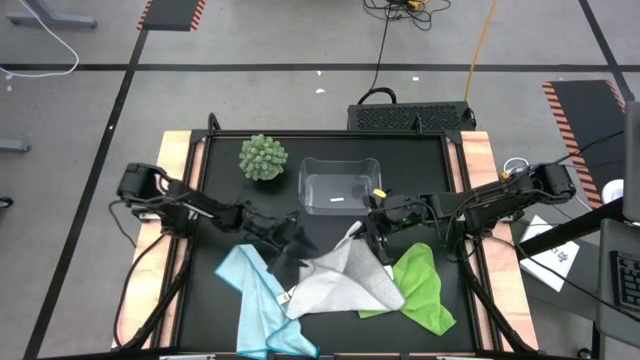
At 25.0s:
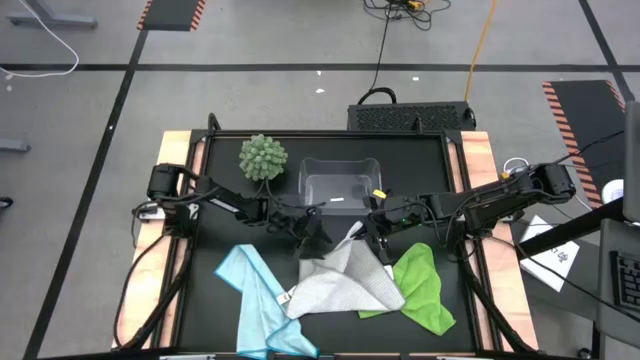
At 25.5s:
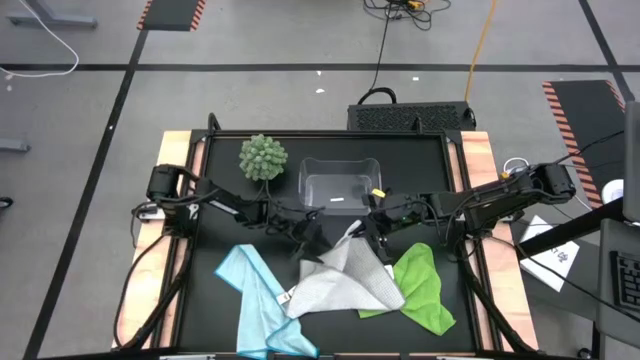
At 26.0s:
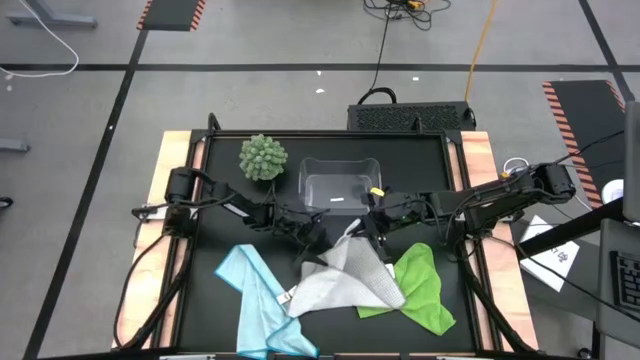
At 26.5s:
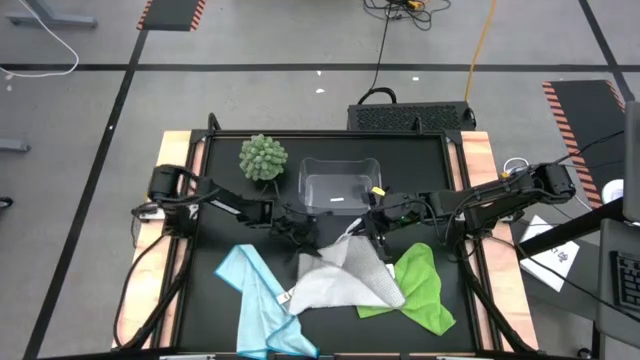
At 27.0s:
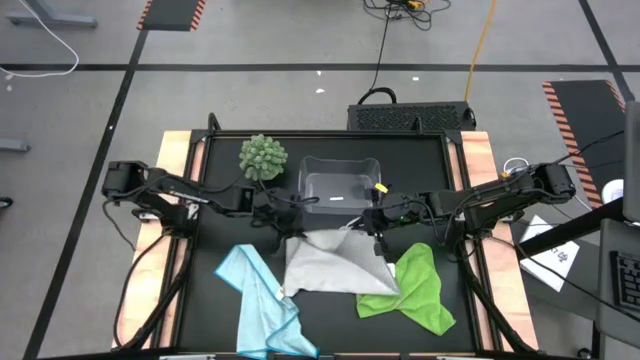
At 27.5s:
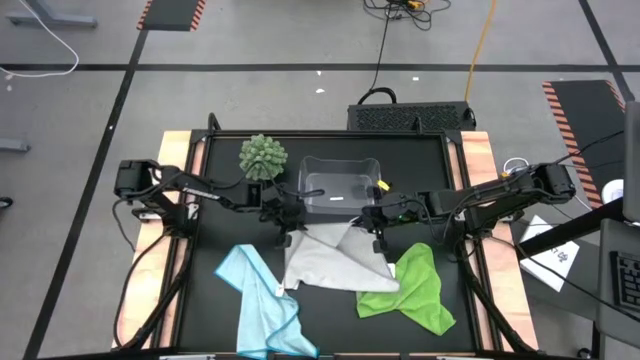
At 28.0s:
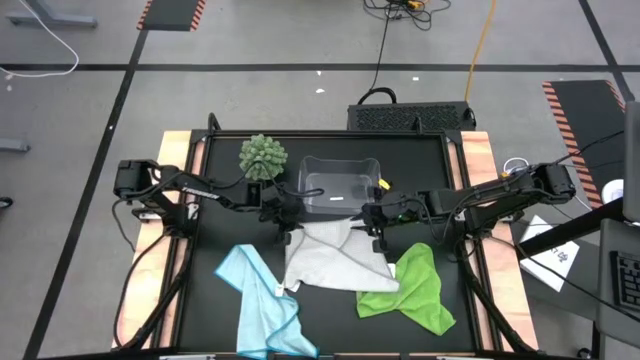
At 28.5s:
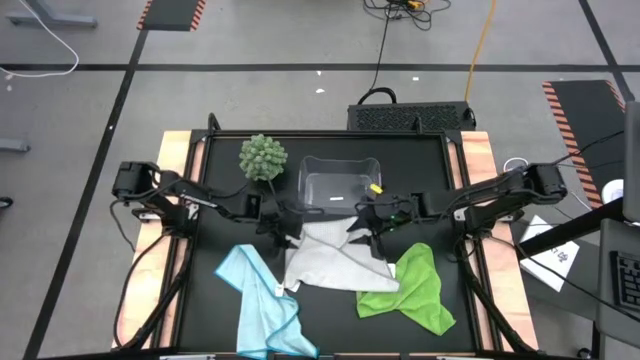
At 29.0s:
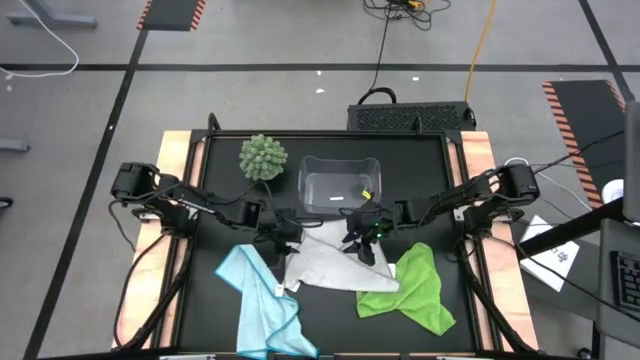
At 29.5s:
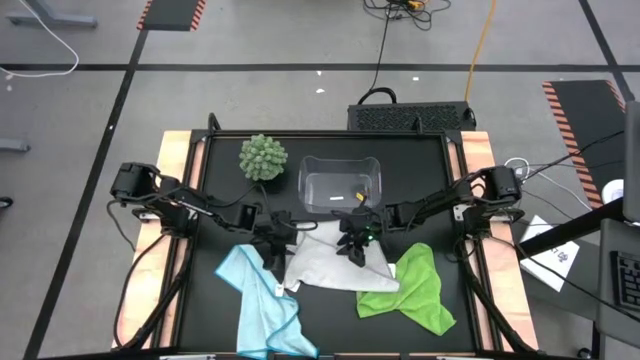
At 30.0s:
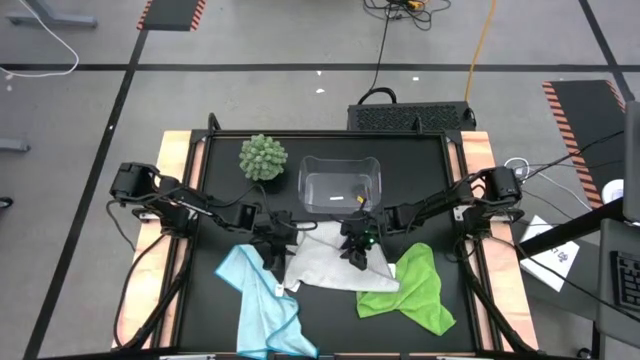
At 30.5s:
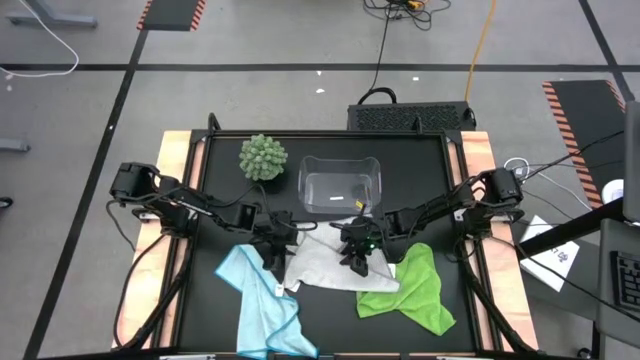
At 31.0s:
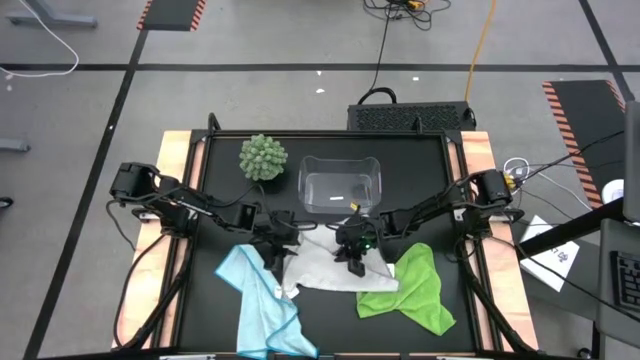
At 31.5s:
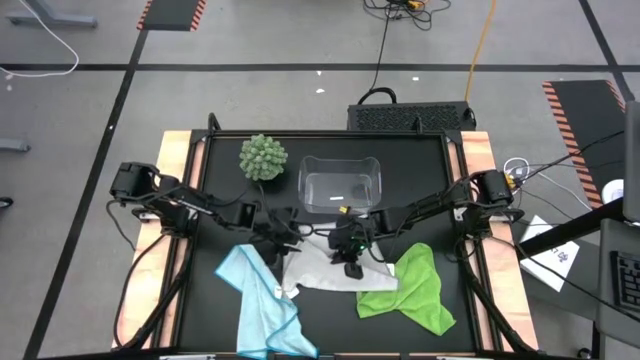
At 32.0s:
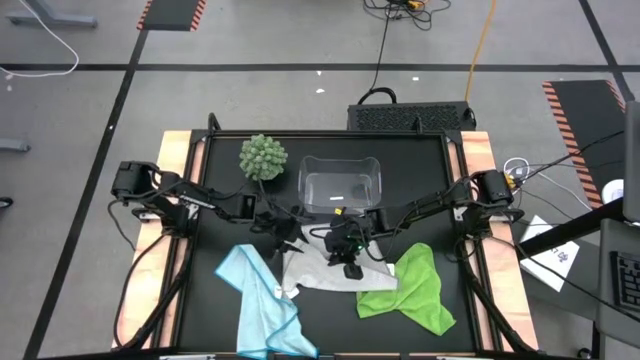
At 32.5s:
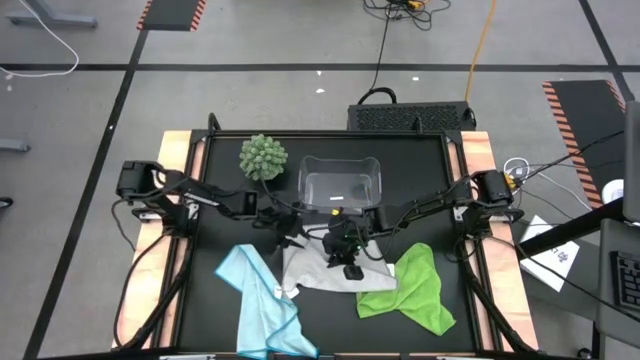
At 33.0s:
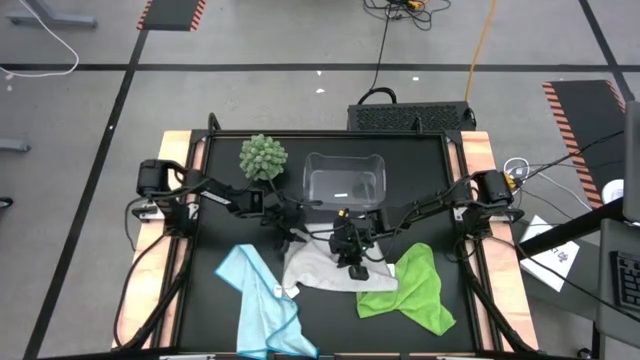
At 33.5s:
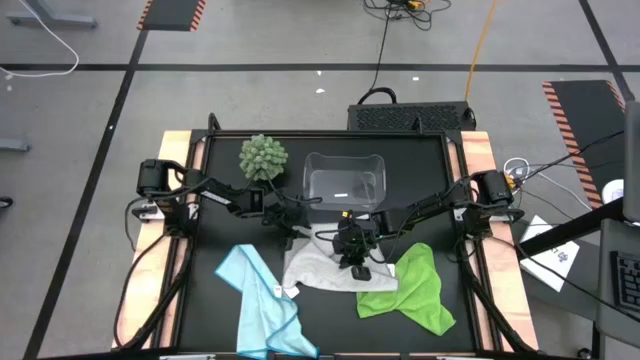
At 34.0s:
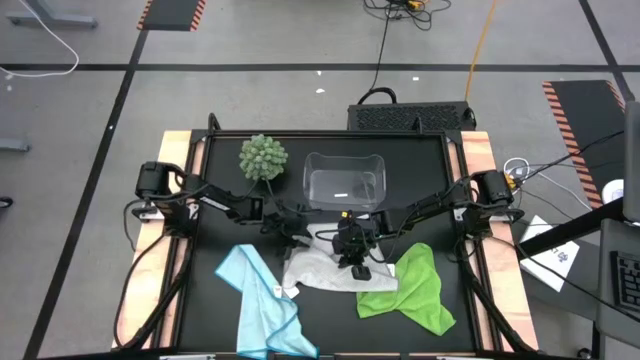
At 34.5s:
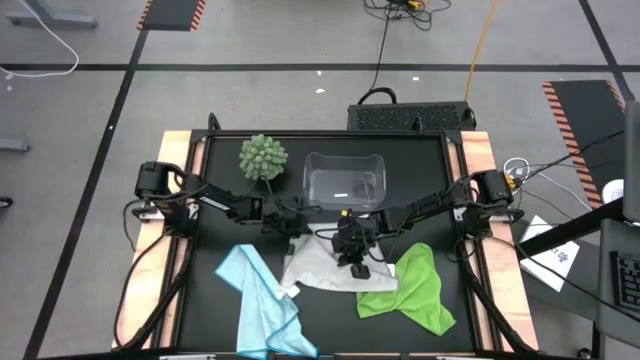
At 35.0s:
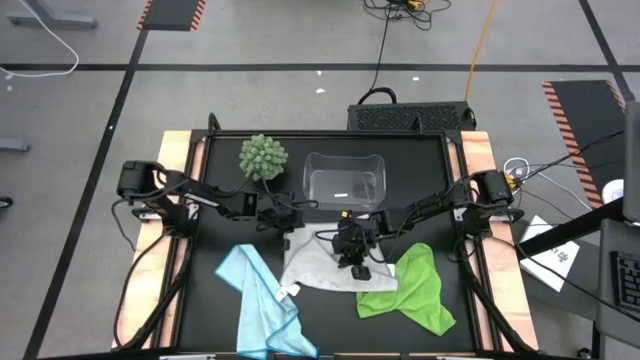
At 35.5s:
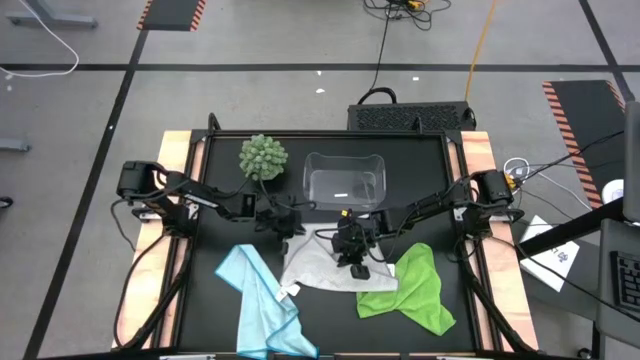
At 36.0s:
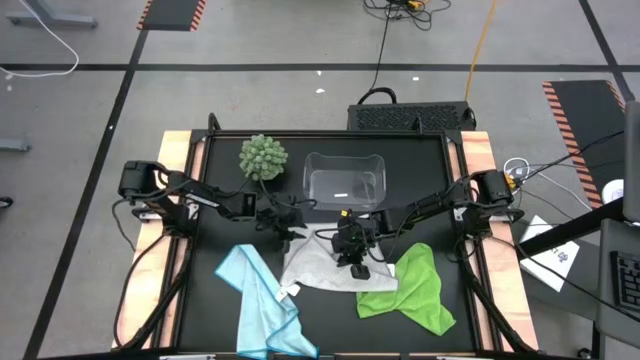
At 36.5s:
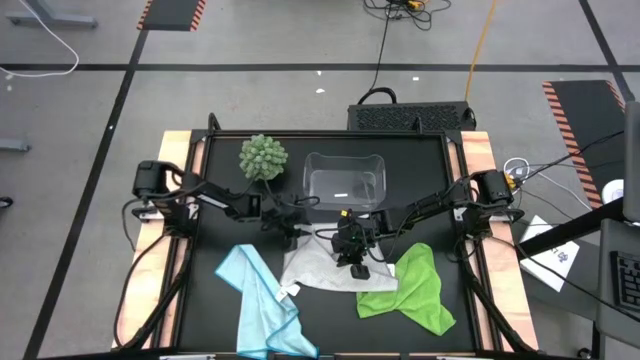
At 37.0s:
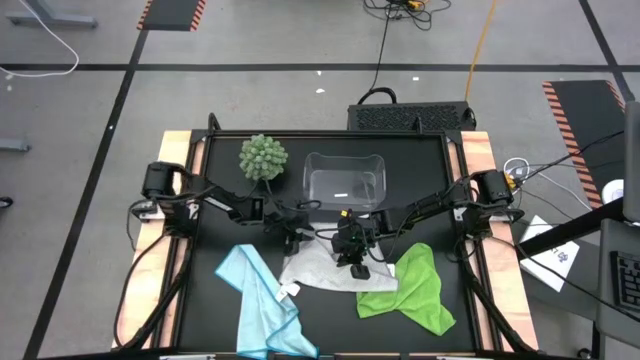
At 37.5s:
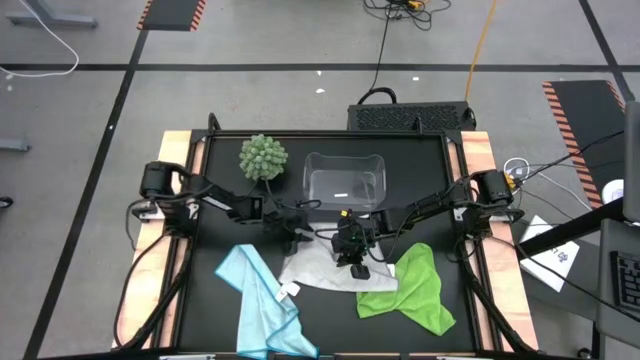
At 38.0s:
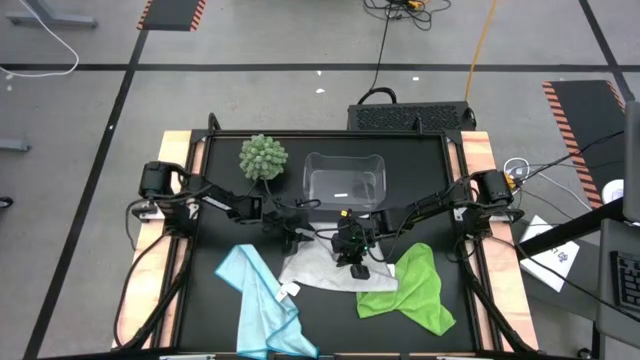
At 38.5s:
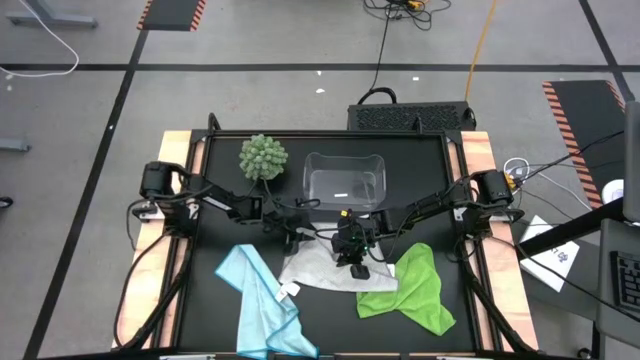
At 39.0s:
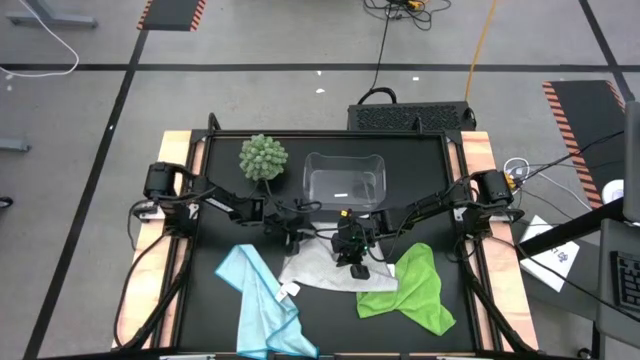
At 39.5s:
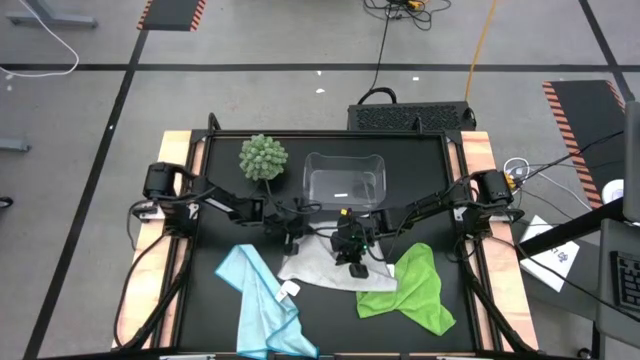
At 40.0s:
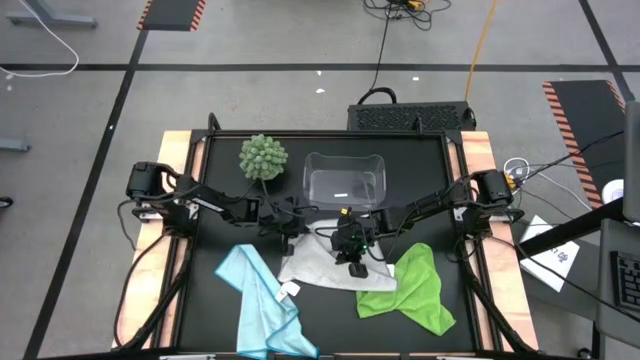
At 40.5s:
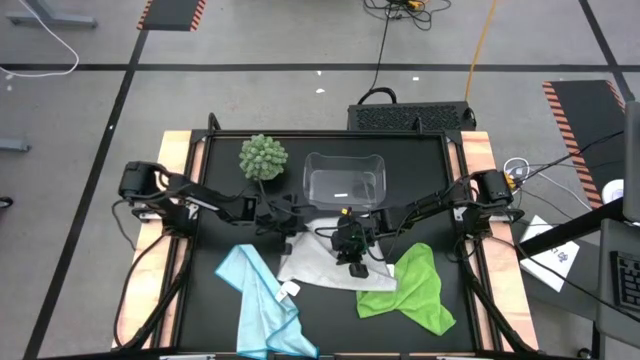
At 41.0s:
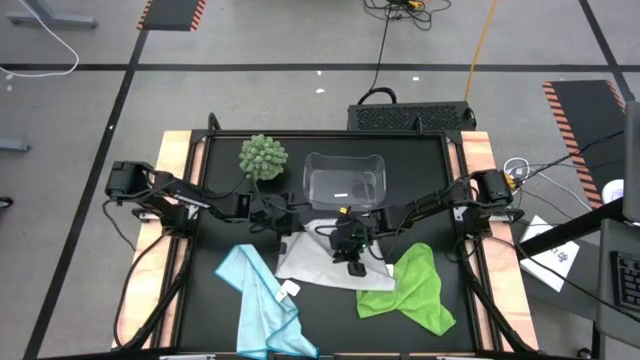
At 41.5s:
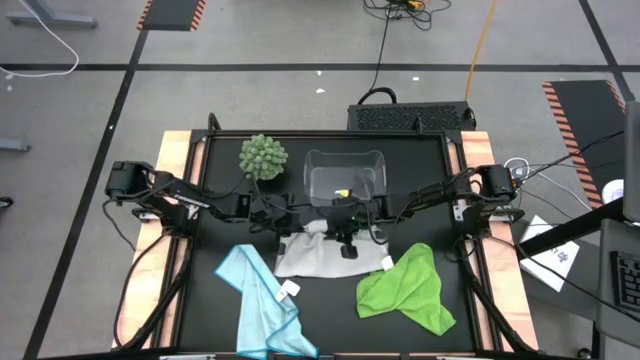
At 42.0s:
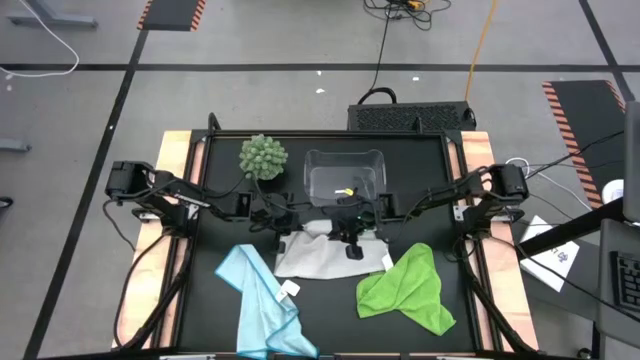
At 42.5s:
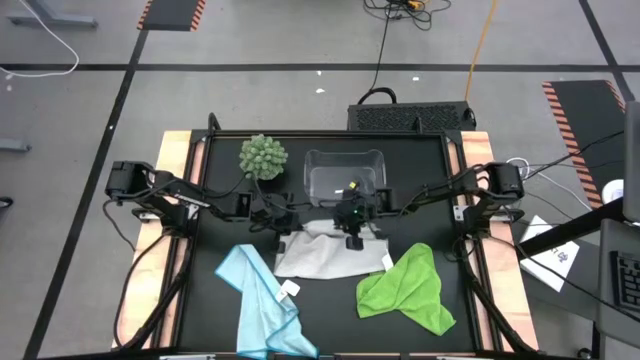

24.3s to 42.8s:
Task: Fold microfiber towels
Fold the gray towel

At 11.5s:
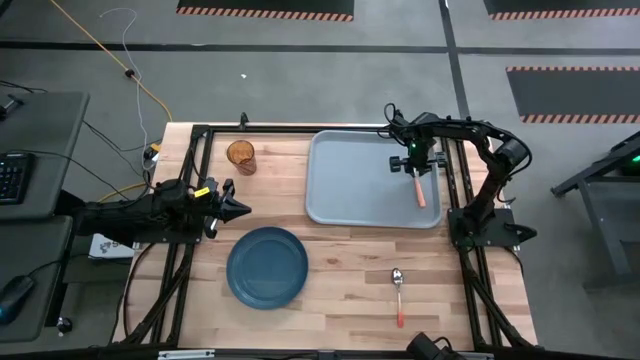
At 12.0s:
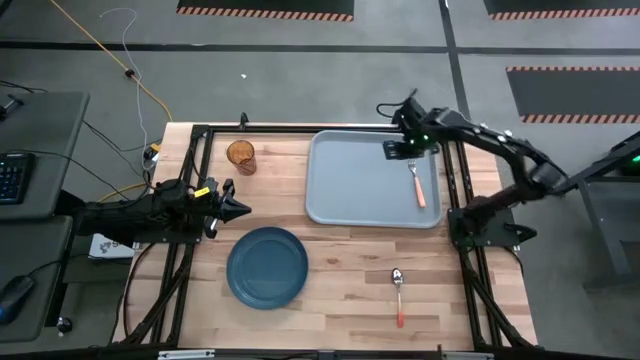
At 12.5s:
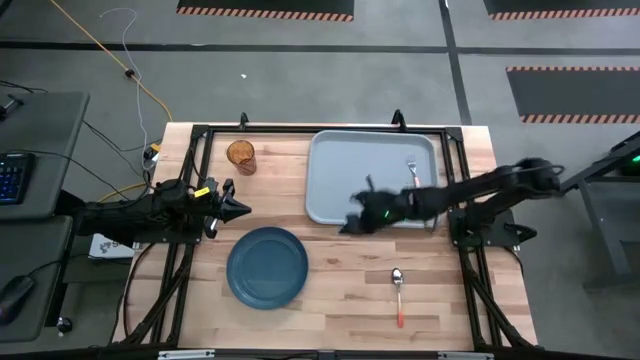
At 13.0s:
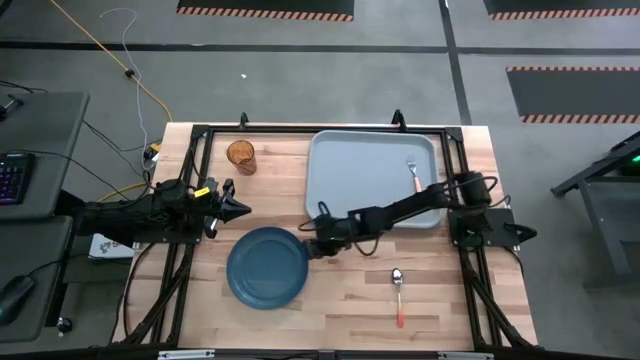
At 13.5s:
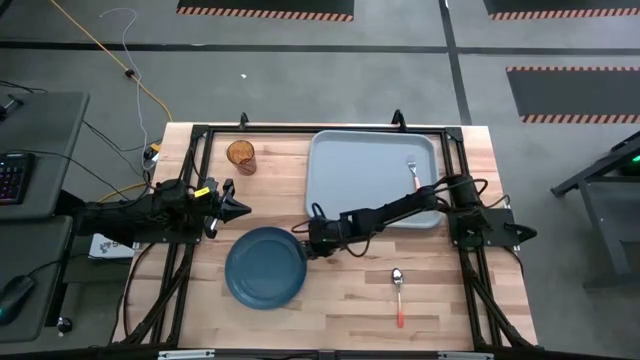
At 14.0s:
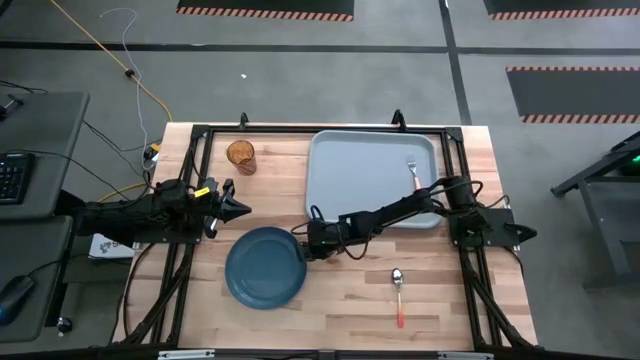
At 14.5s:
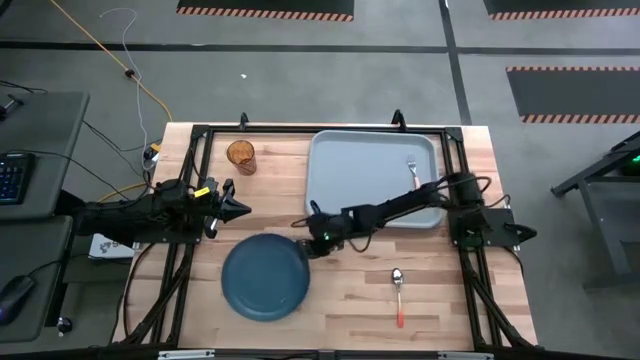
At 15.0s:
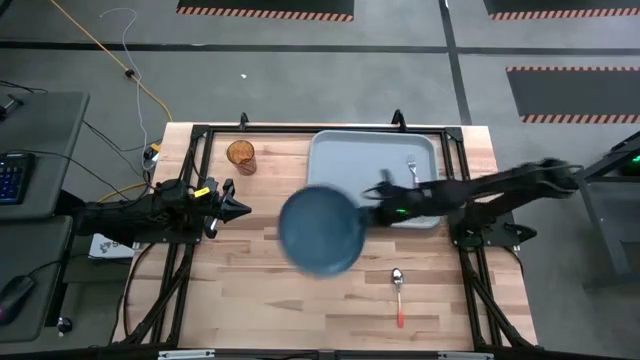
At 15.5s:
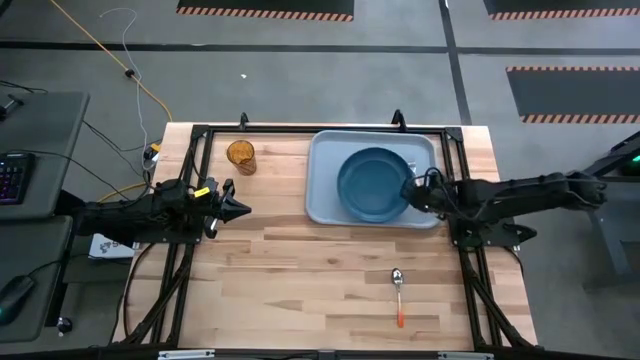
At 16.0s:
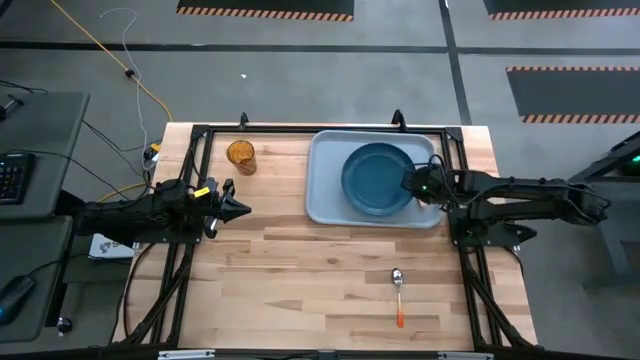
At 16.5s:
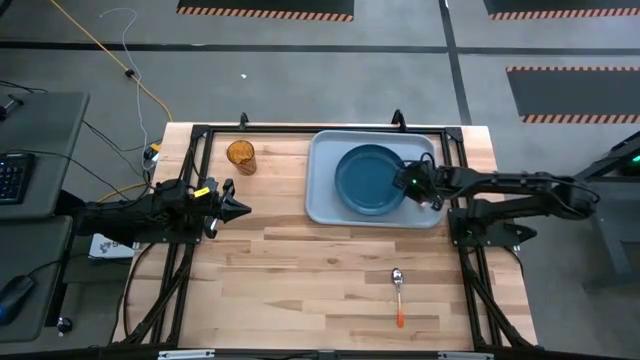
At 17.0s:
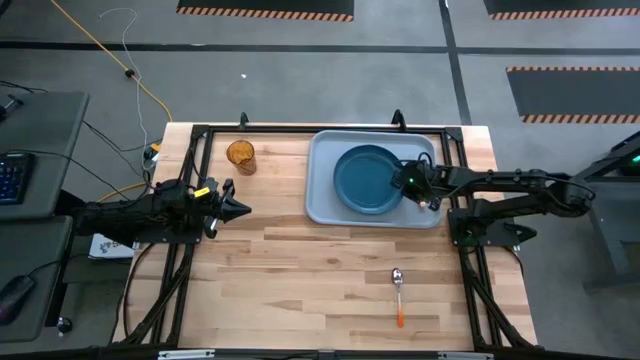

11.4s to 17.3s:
Task: Pick and place plate/cup/fork/spoon on tray
Put the blue plate on the blue tray to the left of the orange fork
